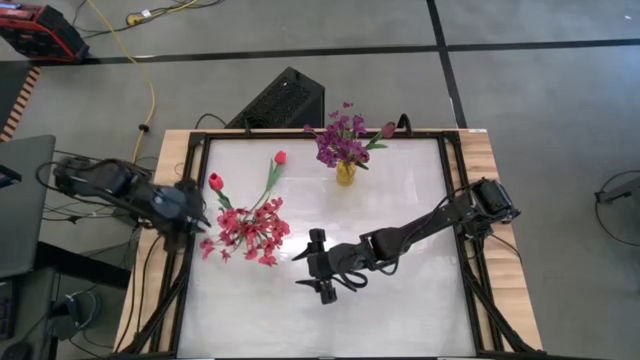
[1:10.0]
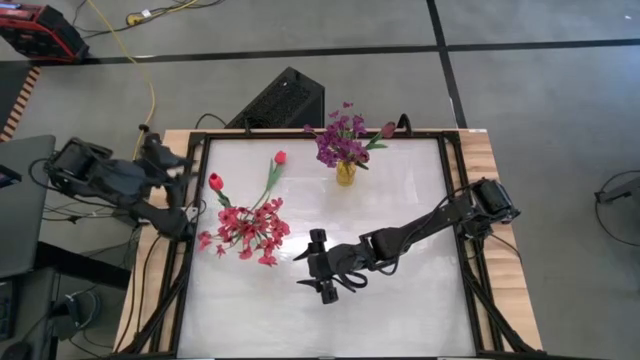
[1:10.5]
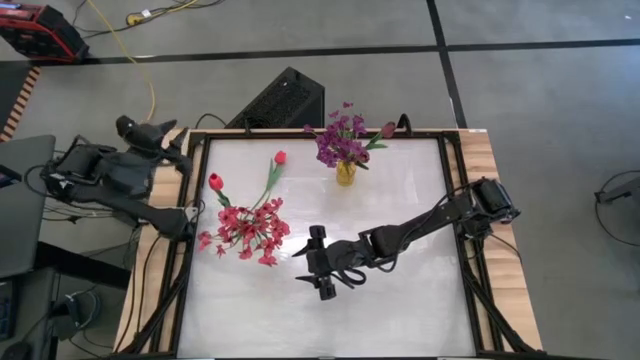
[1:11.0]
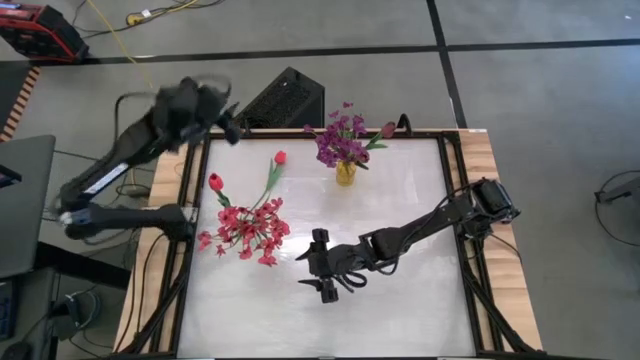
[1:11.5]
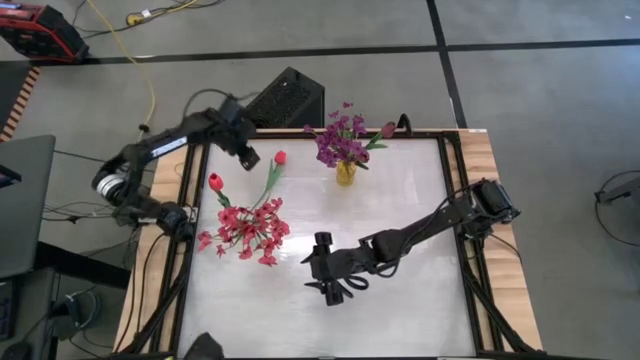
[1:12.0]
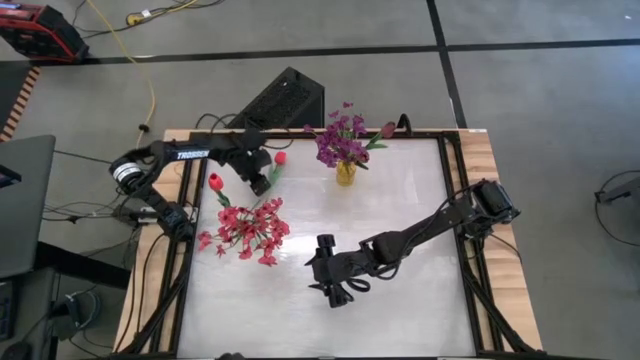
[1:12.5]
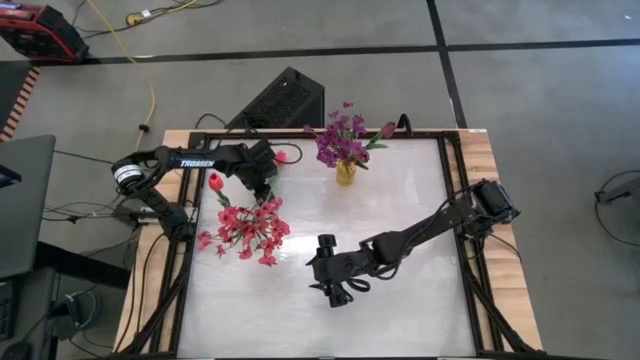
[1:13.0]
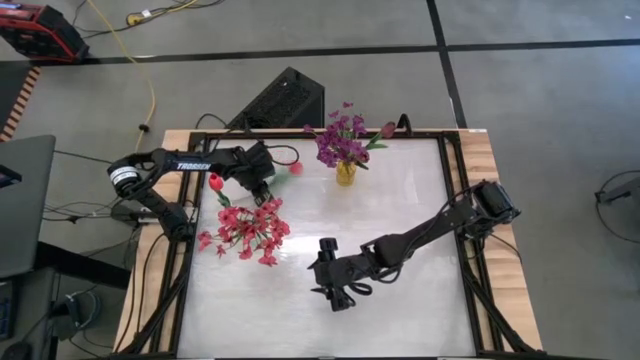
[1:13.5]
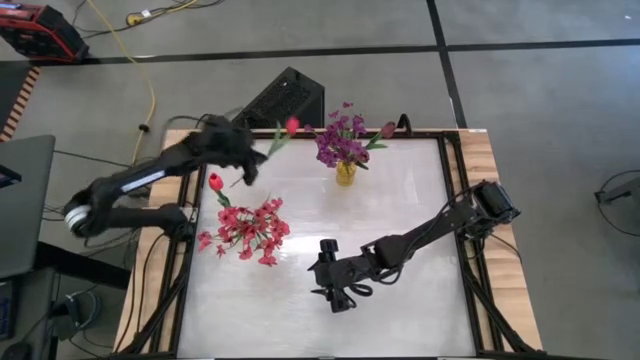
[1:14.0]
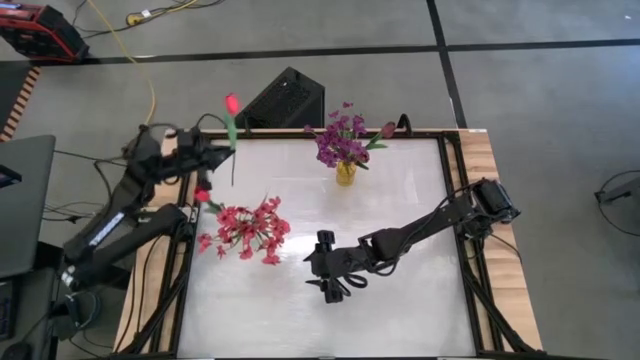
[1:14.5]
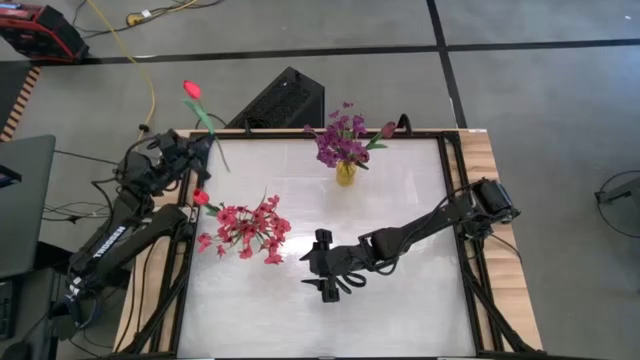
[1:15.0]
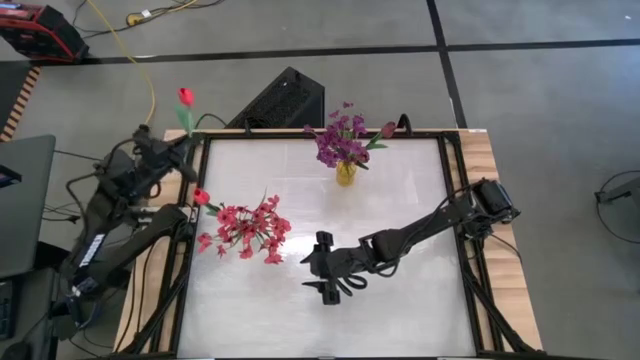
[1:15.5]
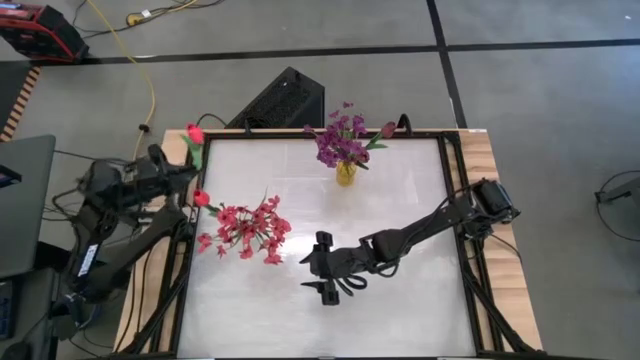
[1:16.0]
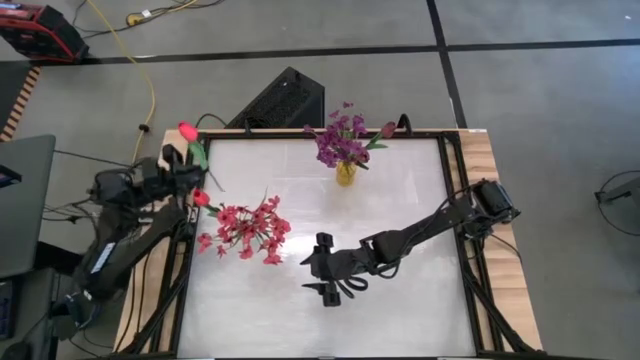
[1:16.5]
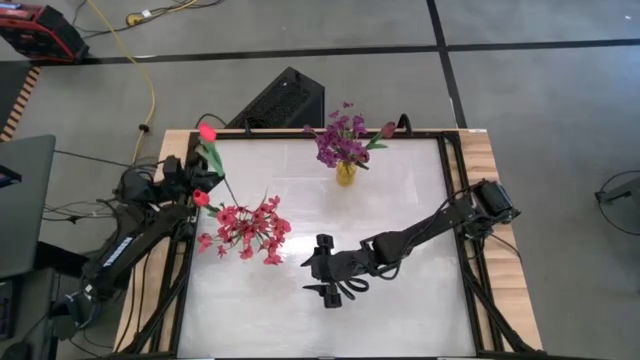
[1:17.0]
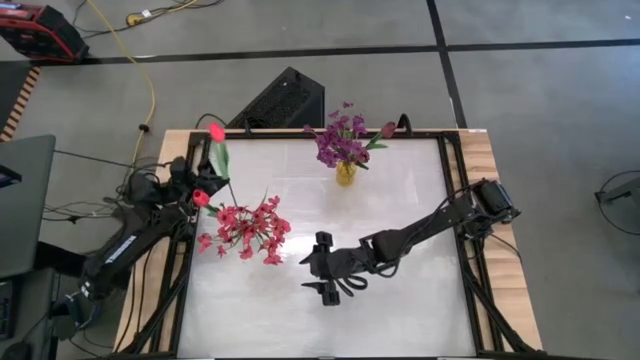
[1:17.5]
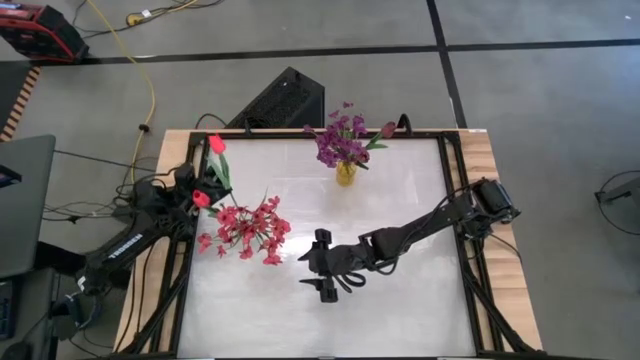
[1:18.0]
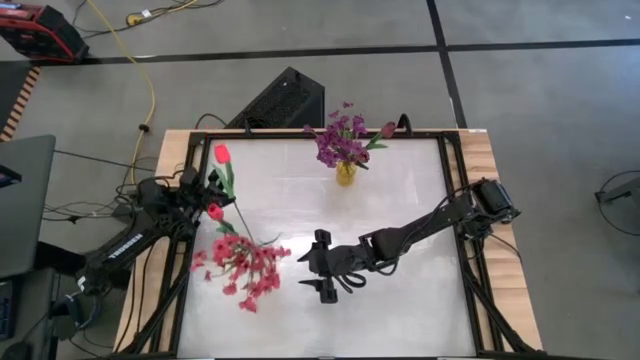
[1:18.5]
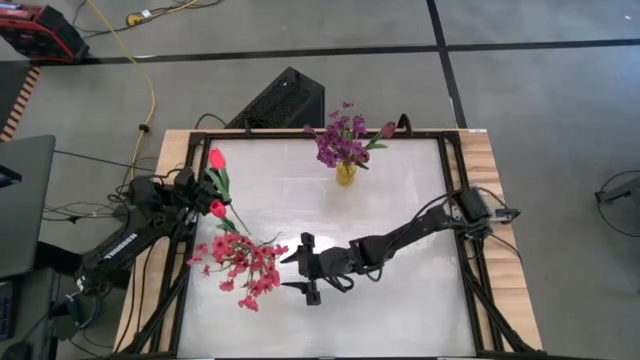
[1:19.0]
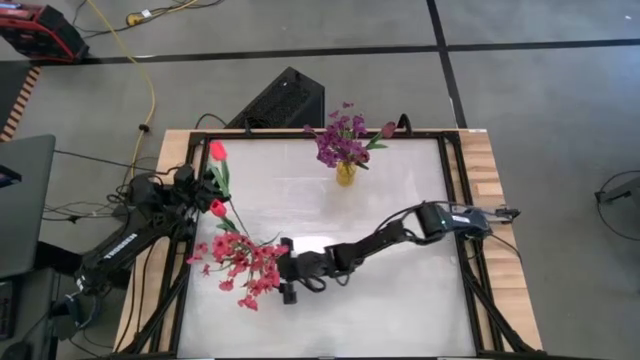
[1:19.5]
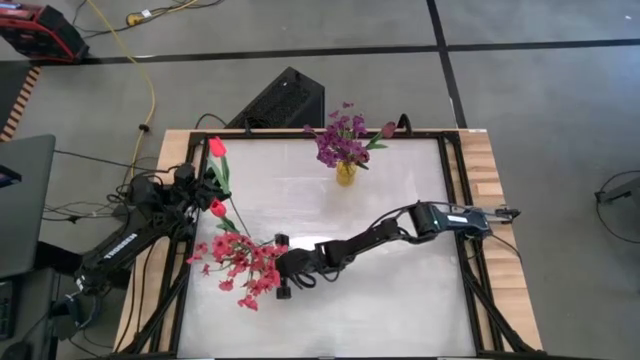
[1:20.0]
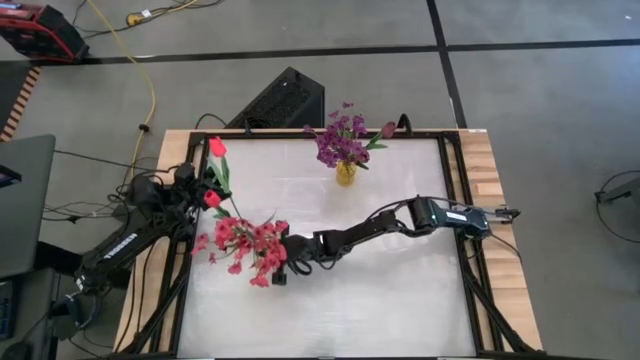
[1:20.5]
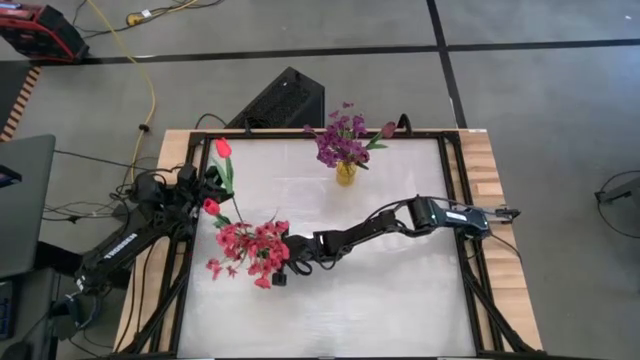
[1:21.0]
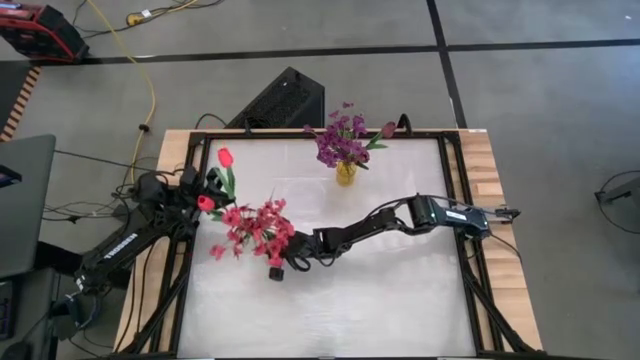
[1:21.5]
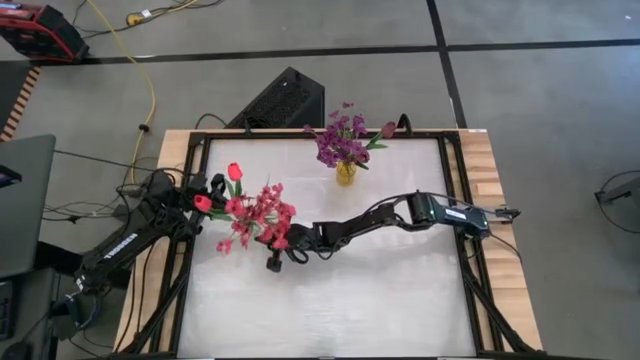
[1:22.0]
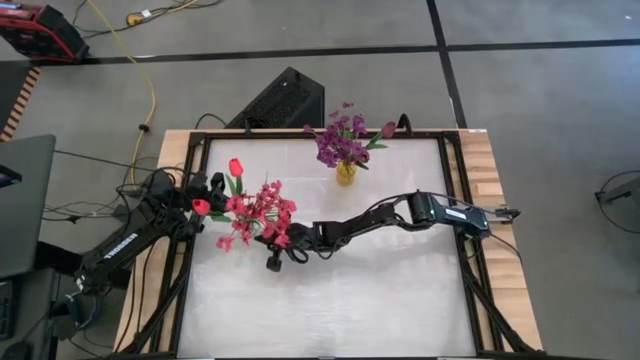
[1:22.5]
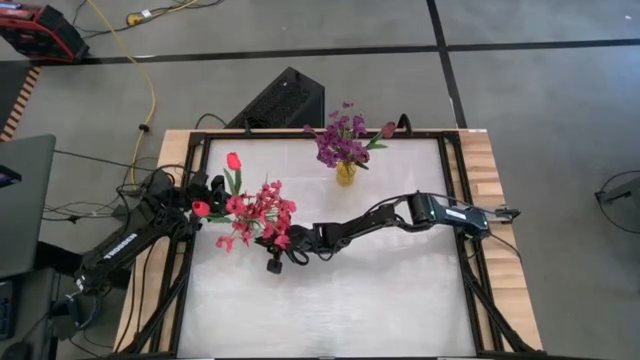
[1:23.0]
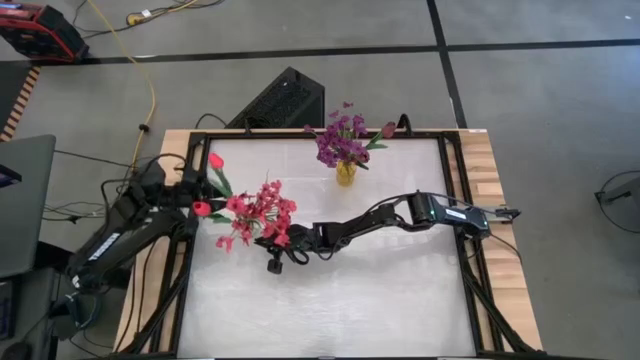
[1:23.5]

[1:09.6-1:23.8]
Task: Sort flowers into vase by color
Put the pink flower into the transparent vase

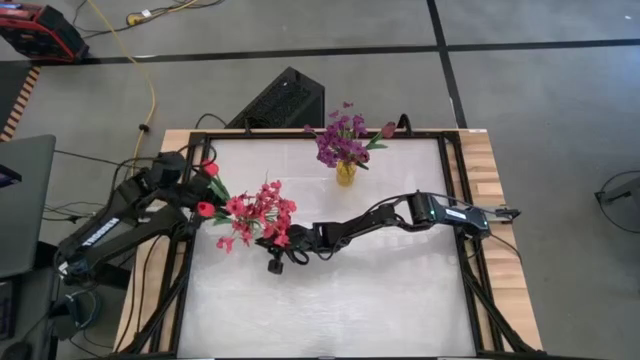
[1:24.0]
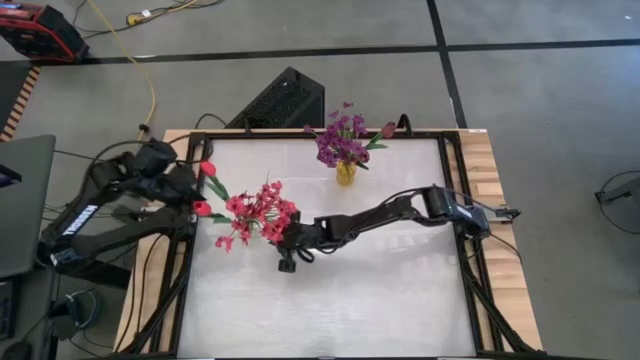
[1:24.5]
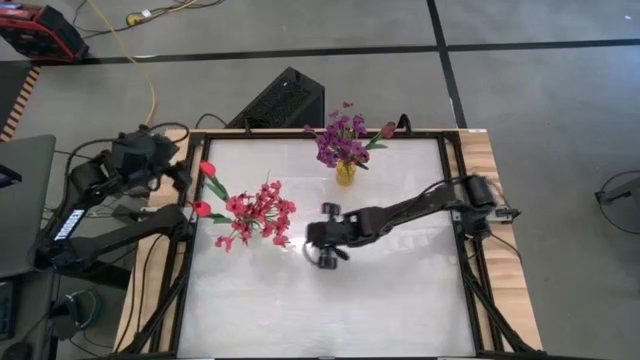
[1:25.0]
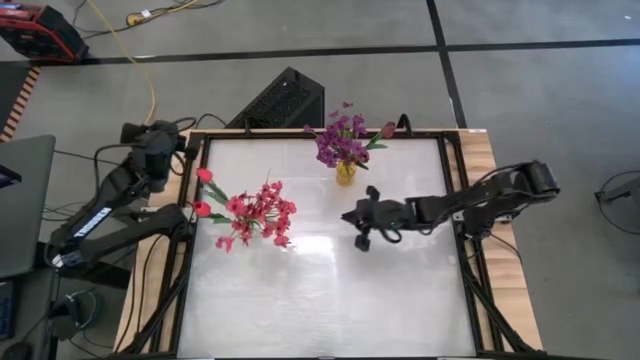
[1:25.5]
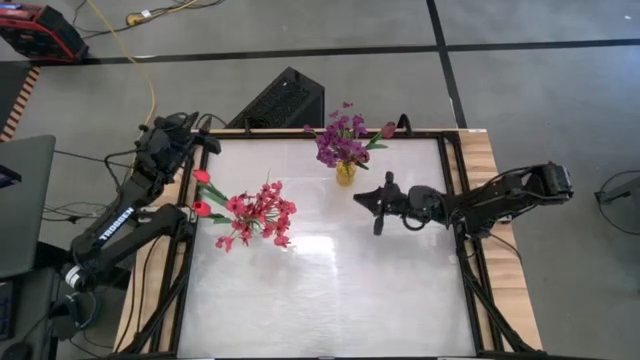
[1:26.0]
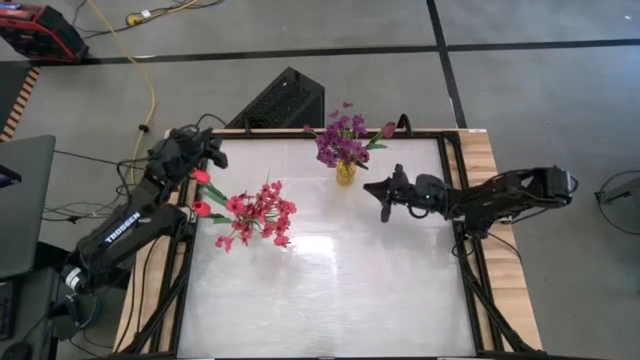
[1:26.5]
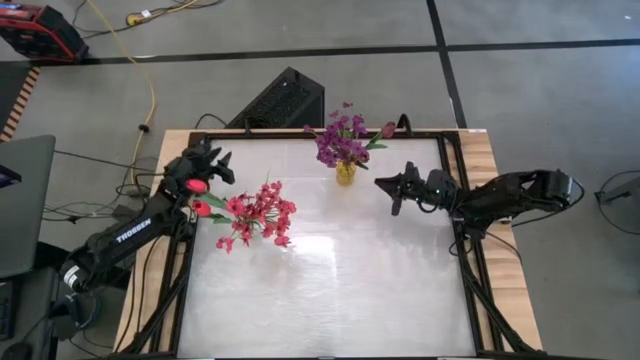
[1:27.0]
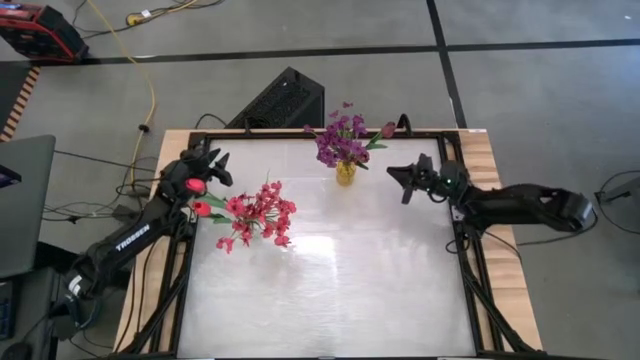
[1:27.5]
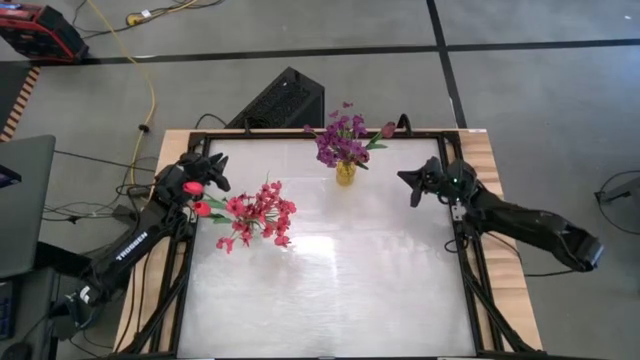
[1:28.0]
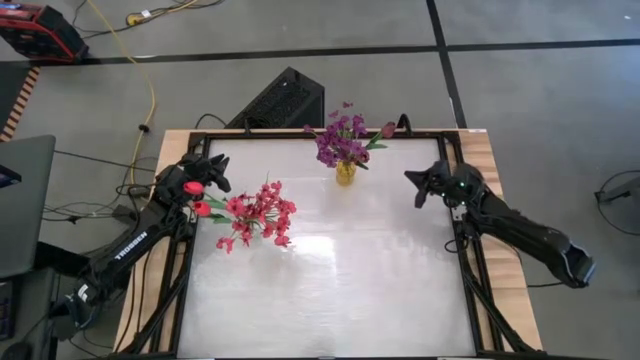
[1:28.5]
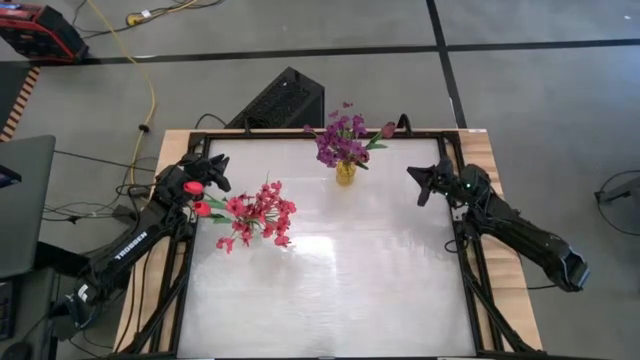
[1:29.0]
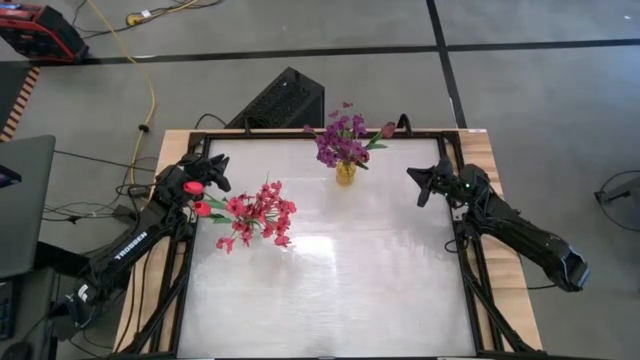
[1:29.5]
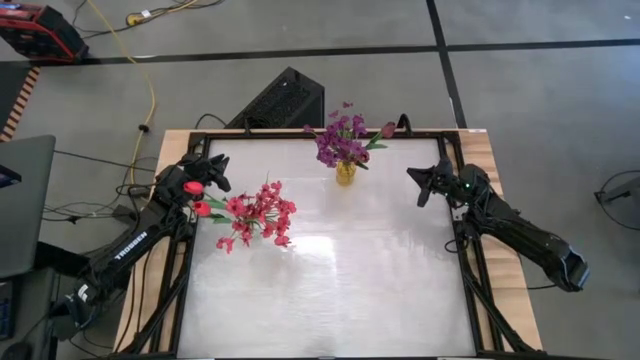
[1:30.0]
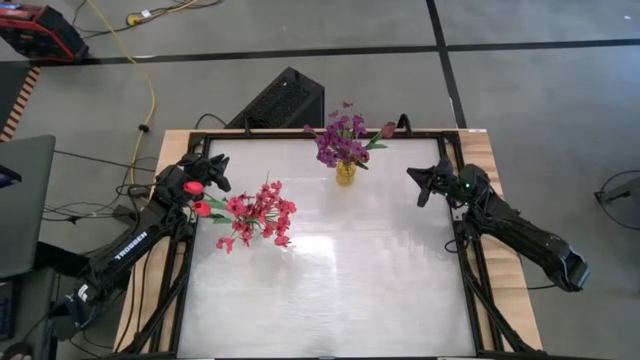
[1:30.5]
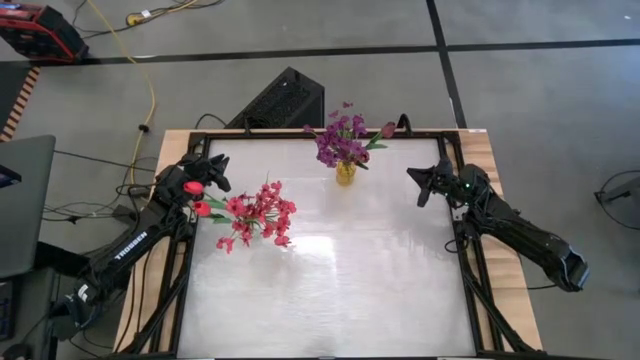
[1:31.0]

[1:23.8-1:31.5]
Return to Home Position
